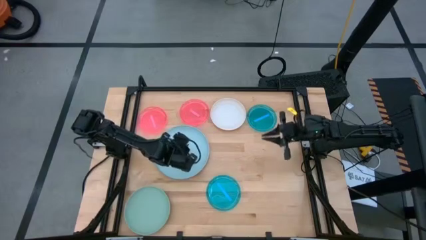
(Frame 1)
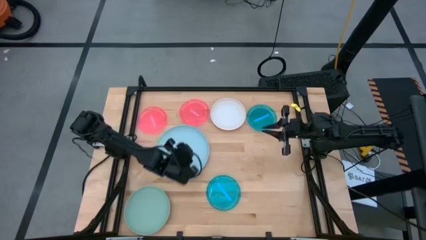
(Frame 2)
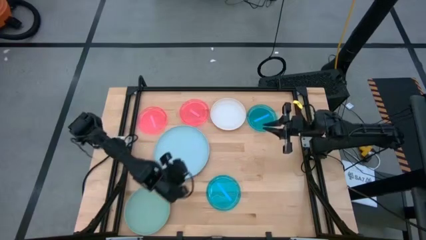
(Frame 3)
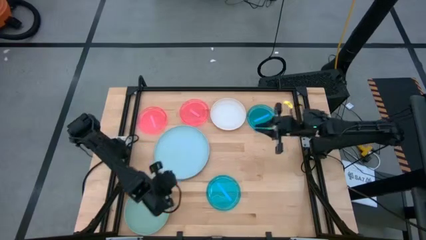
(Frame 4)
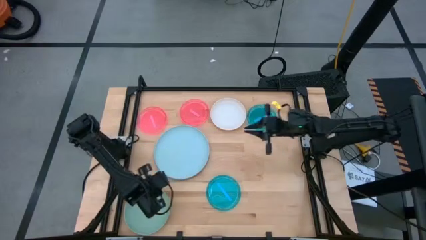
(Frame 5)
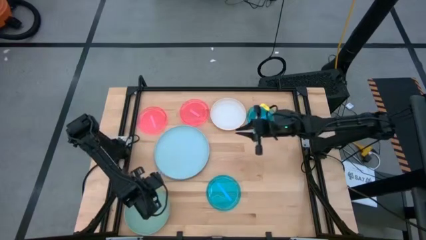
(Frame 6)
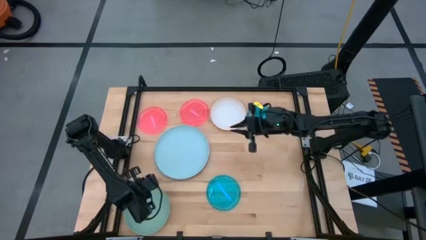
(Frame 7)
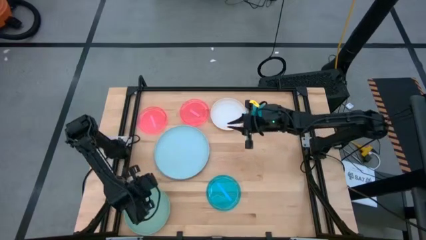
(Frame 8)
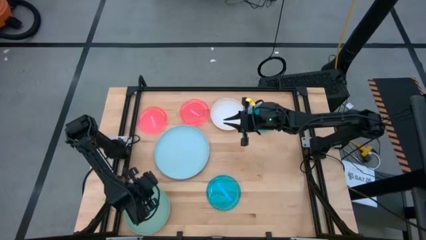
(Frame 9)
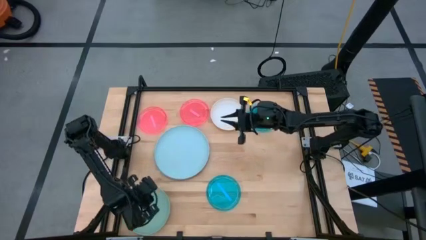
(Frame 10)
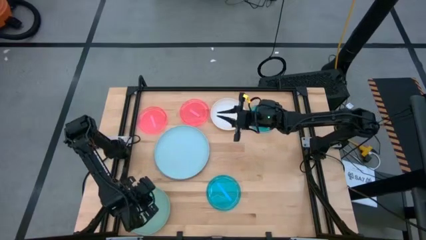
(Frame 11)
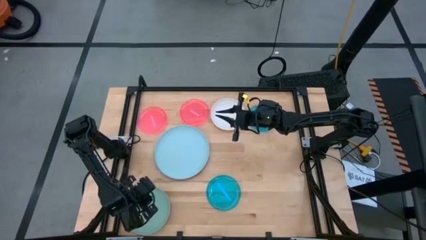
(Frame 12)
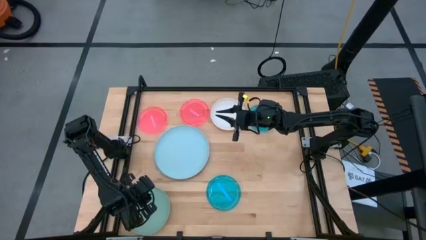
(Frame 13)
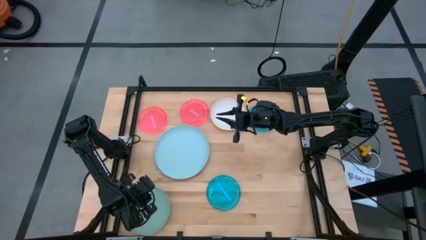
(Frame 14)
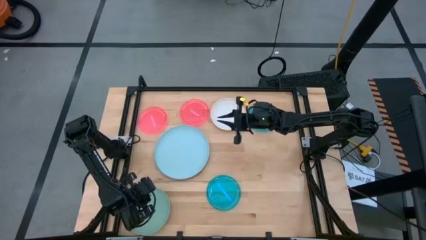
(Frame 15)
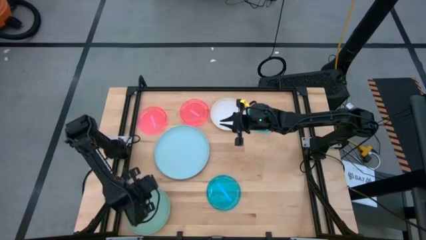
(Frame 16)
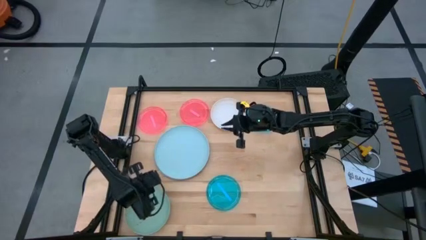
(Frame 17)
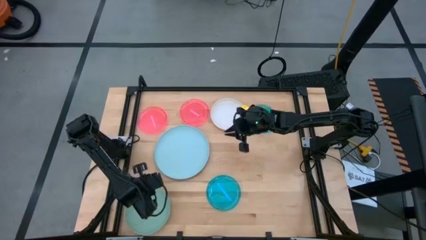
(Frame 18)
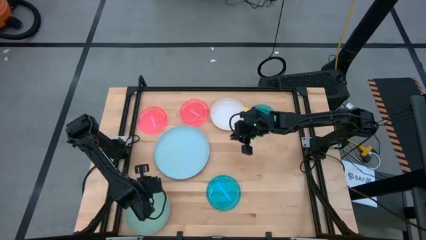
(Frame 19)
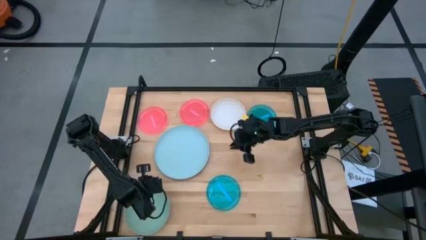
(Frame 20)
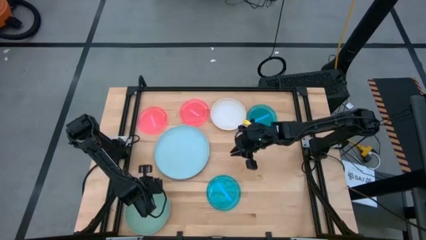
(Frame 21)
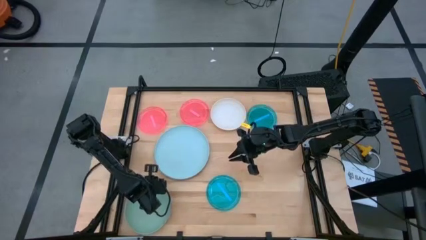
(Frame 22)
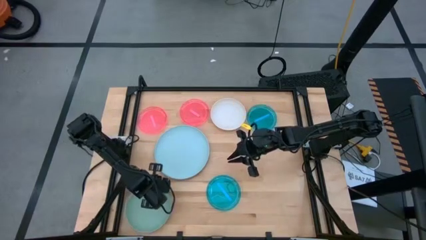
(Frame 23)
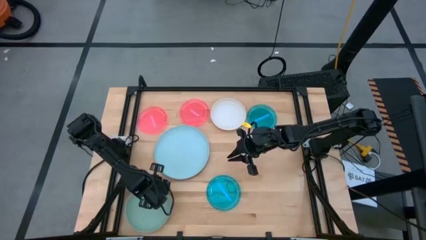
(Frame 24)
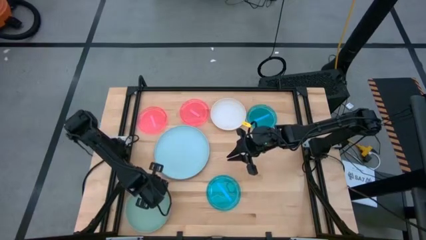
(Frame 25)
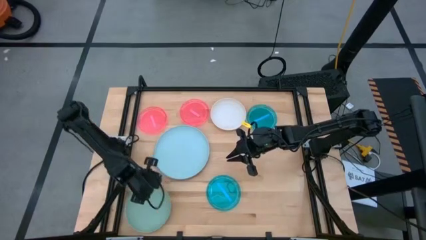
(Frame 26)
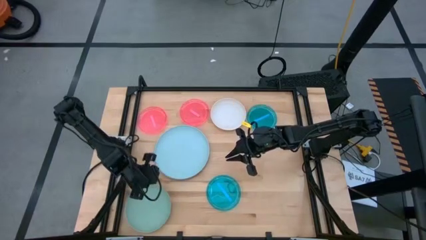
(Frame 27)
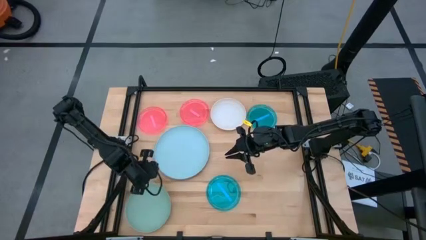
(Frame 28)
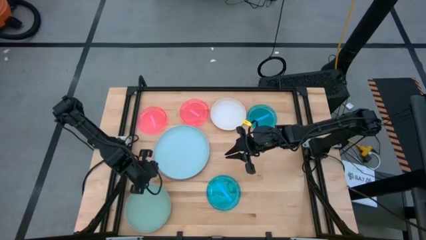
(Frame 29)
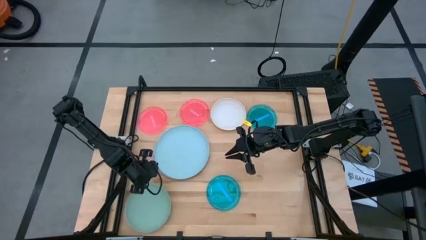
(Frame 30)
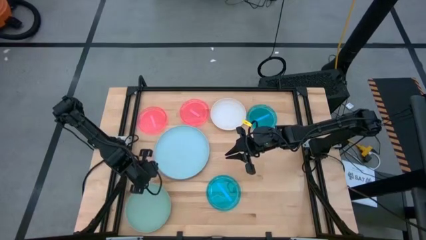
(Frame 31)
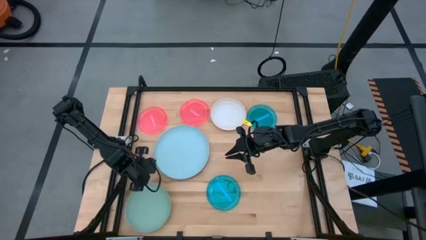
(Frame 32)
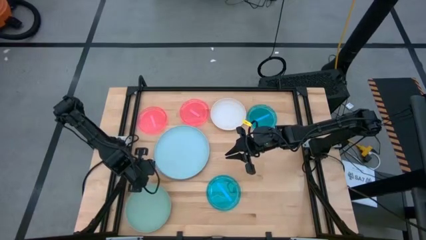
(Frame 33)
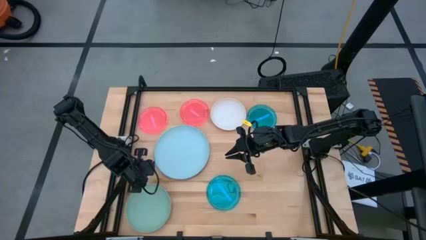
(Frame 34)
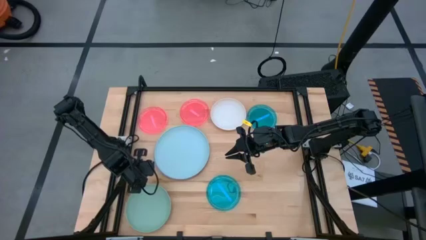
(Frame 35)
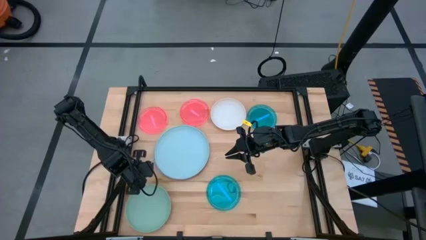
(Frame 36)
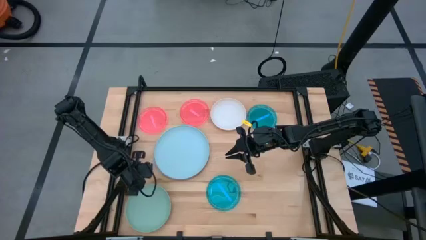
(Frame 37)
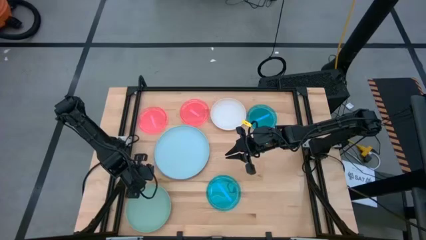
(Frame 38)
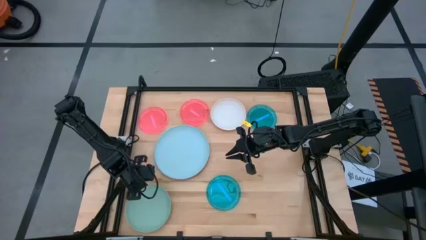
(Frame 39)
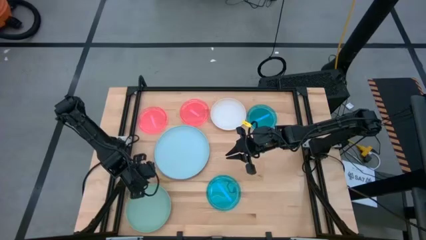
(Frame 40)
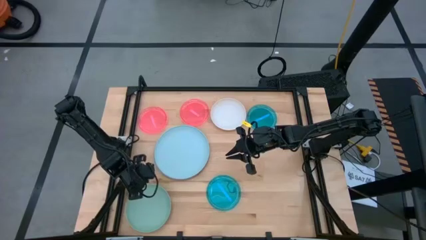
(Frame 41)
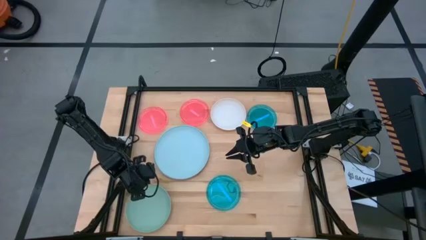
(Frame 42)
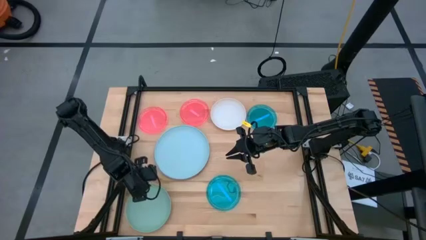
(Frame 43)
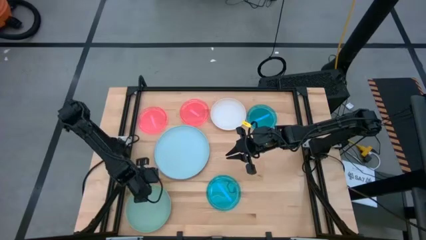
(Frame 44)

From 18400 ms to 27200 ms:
Task: Stack plastic plates
Stack the light green plate on top of the light blue plate

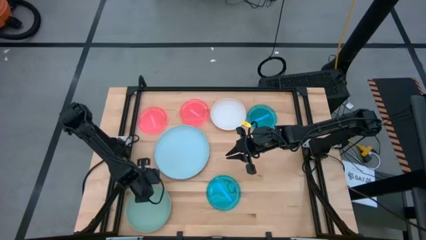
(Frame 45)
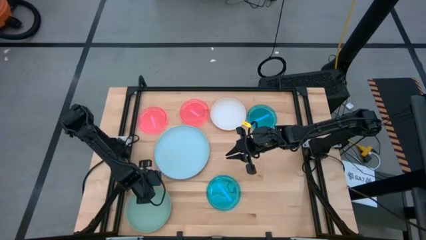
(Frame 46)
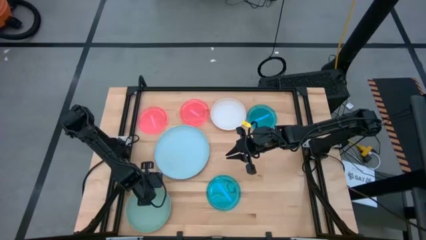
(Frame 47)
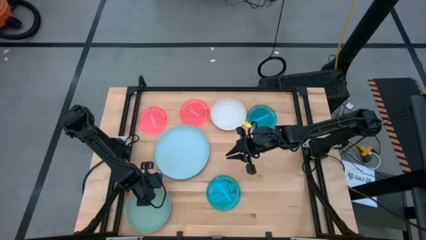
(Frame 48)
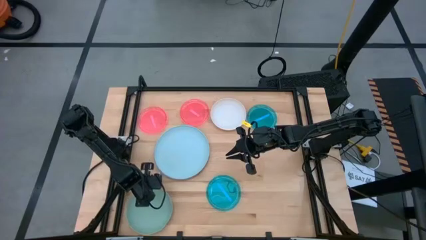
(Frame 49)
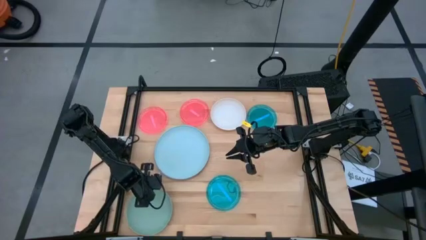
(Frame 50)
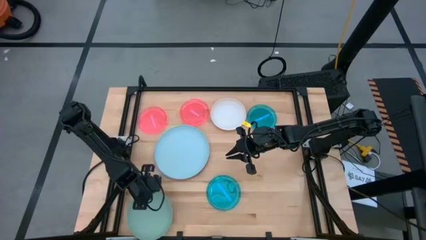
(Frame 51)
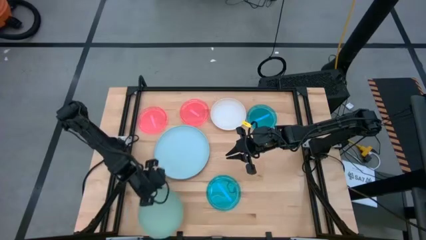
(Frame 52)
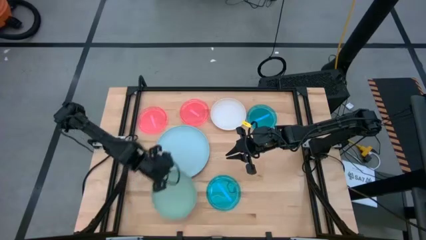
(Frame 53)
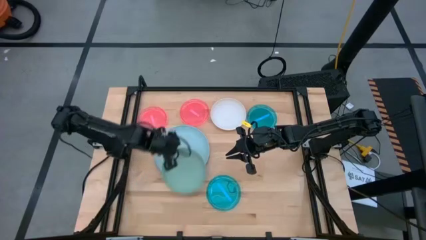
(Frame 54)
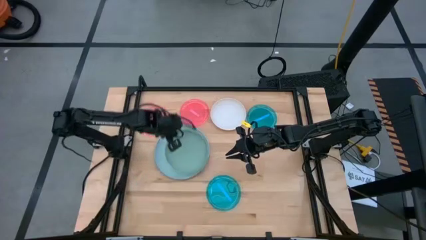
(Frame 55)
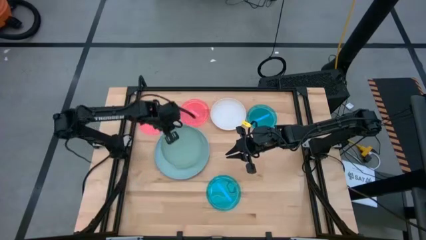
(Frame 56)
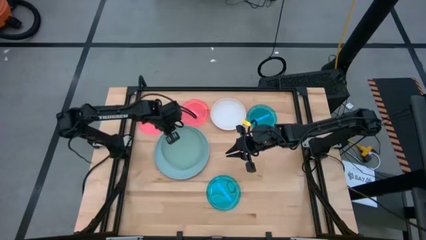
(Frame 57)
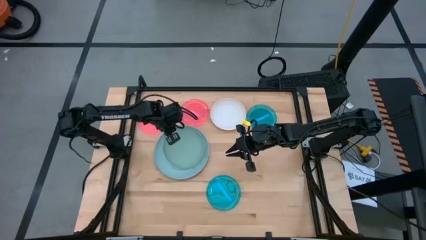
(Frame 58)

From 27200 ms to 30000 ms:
Stack the light green plate on top of the light blue plate

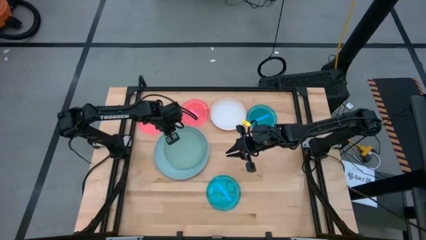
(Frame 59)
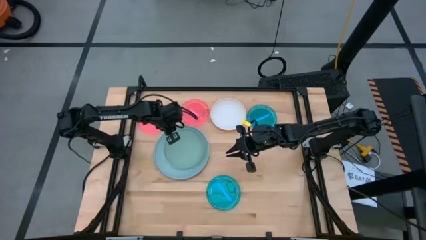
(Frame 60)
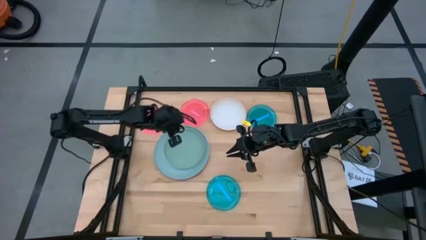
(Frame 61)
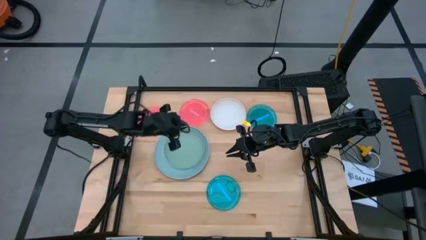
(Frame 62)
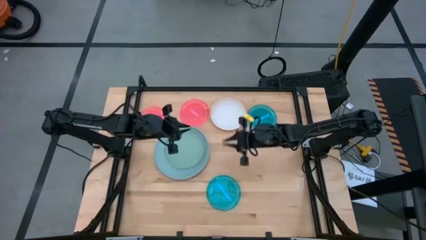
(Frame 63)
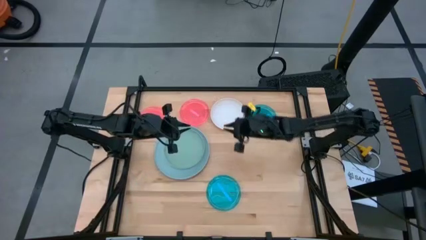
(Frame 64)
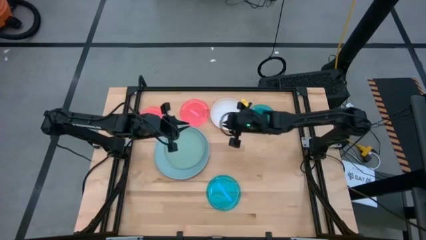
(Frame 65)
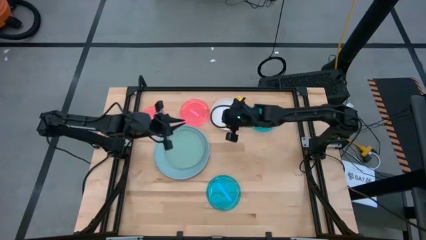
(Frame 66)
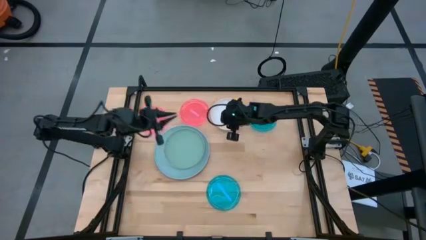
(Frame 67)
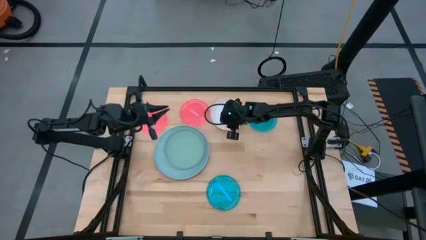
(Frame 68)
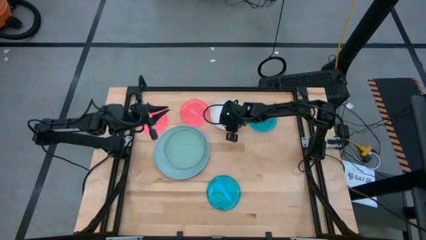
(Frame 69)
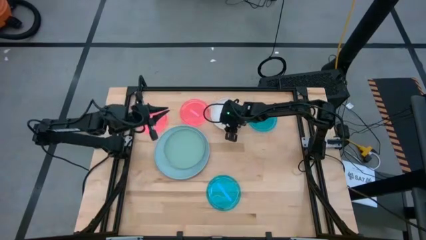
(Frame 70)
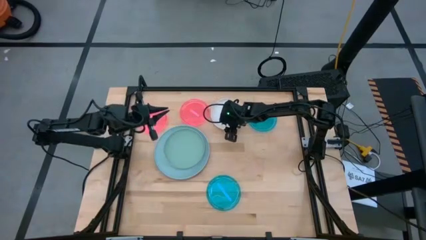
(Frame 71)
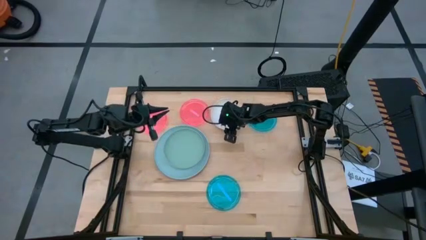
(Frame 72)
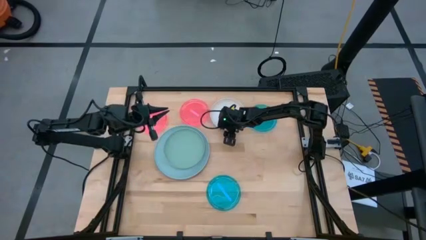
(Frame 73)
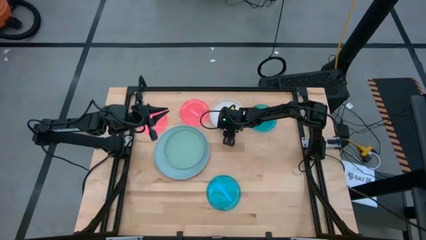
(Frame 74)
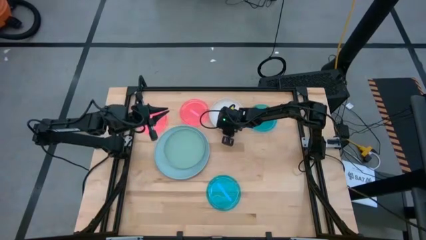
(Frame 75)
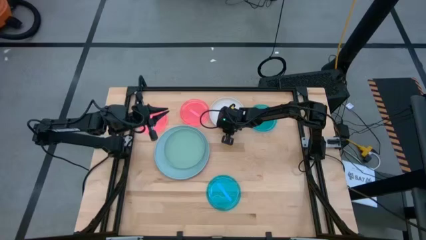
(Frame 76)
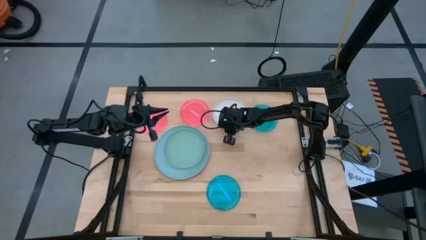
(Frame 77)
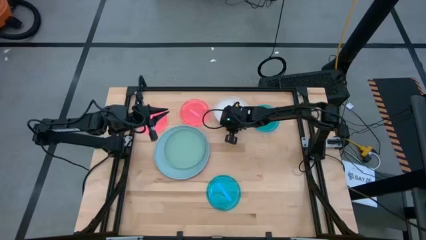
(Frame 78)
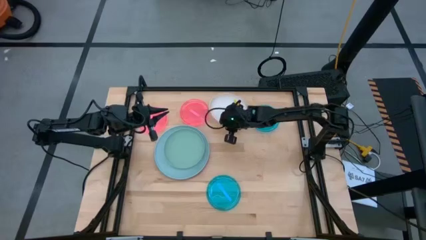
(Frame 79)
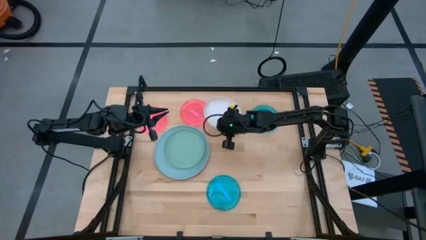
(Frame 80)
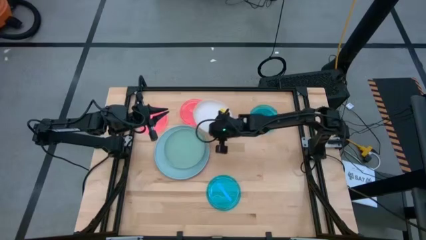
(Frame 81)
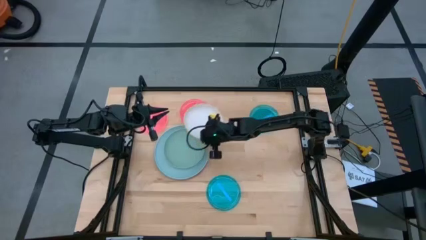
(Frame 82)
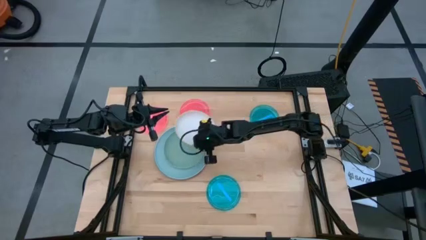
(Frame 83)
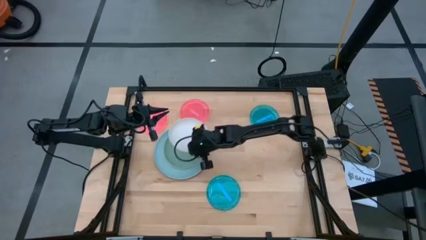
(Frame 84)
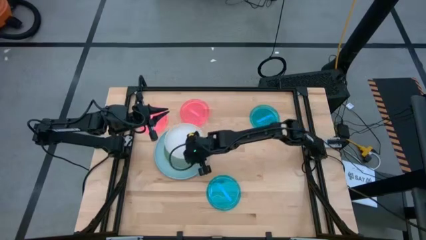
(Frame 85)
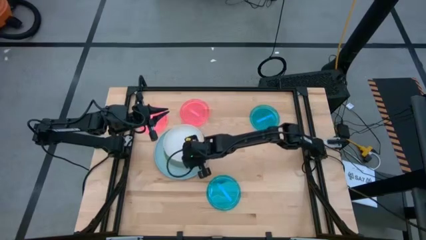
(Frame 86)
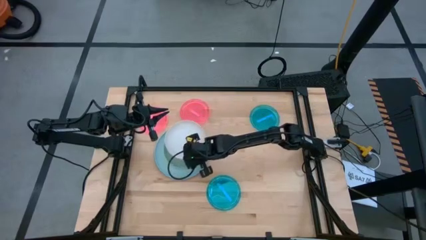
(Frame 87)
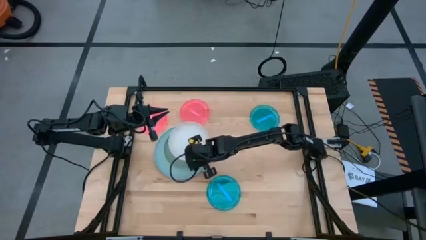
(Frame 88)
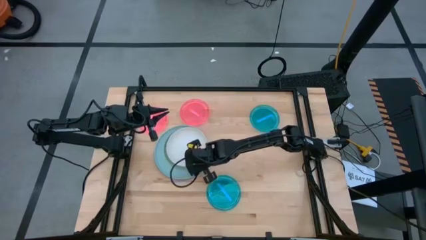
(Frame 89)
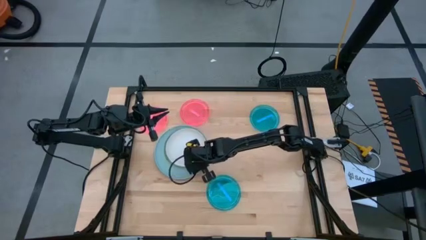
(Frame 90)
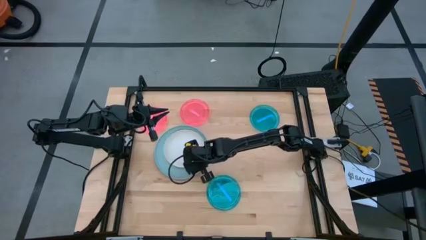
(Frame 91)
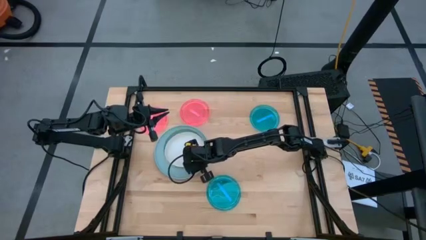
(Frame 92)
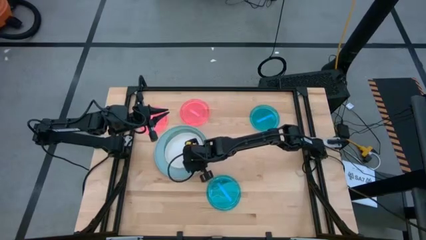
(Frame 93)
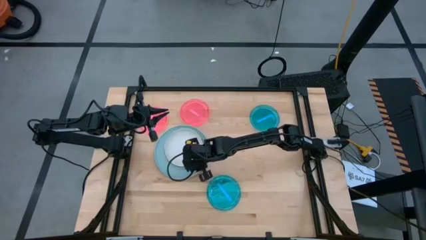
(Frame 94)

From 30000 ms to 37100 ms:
Stack the white plate on top of the light green plate
